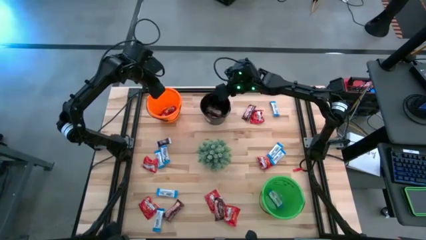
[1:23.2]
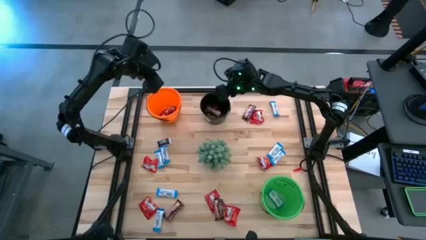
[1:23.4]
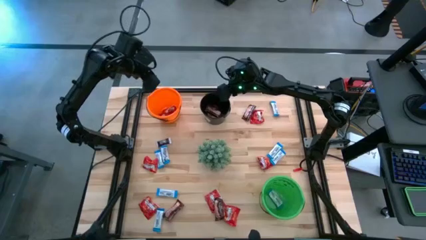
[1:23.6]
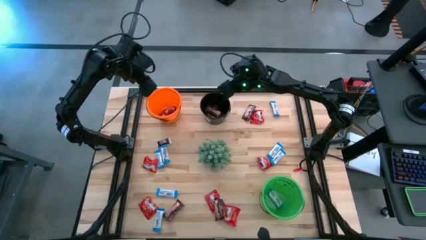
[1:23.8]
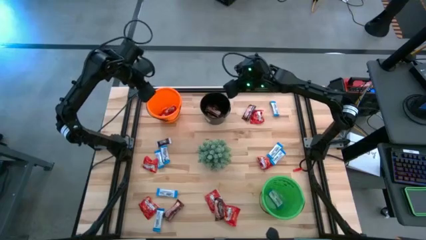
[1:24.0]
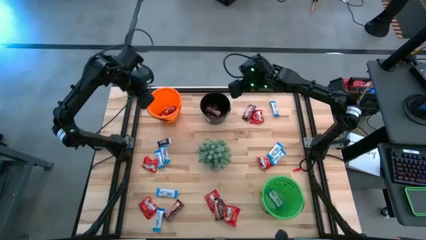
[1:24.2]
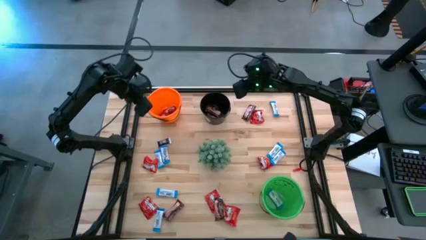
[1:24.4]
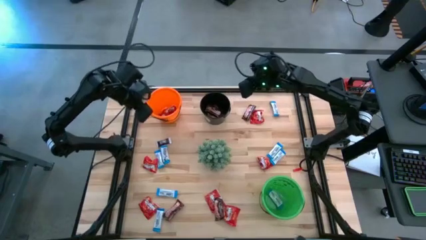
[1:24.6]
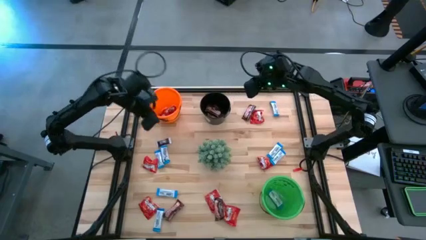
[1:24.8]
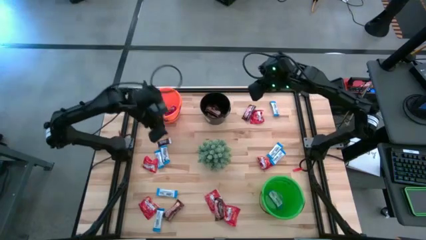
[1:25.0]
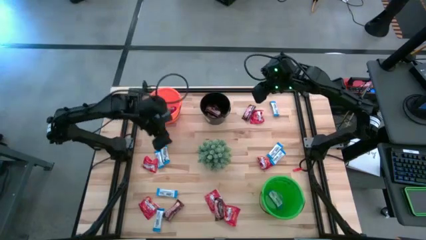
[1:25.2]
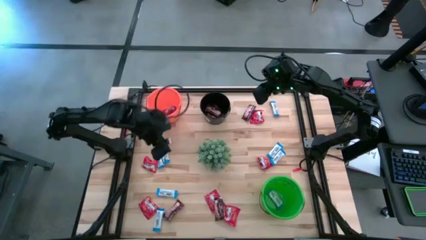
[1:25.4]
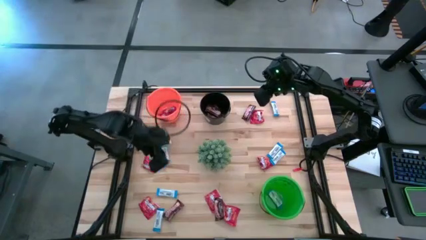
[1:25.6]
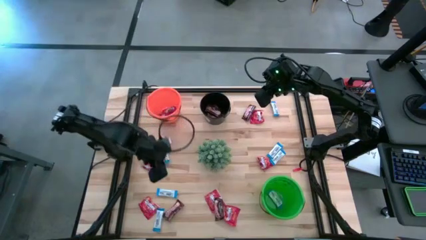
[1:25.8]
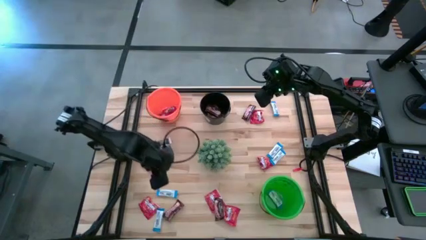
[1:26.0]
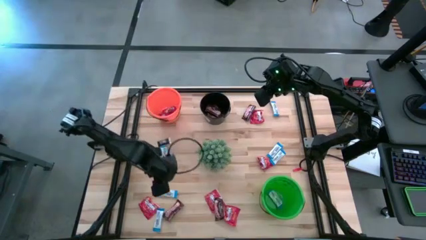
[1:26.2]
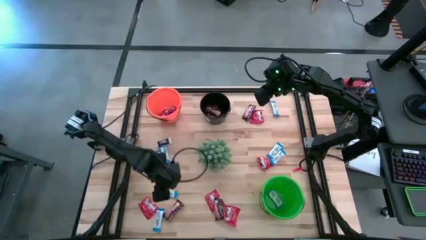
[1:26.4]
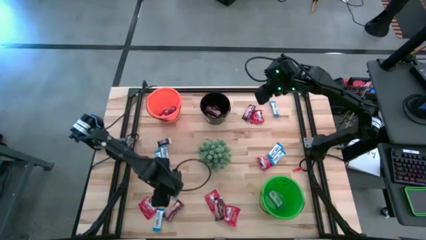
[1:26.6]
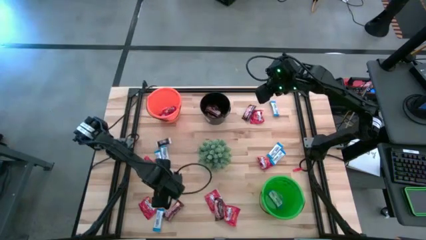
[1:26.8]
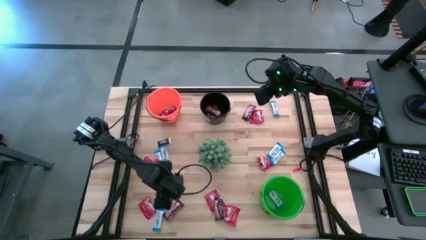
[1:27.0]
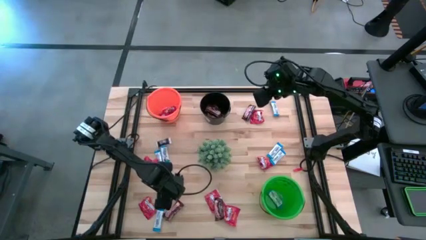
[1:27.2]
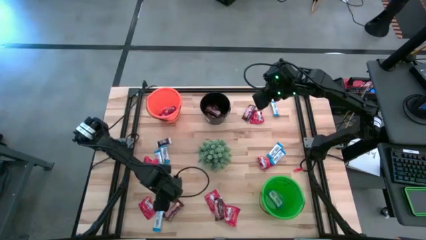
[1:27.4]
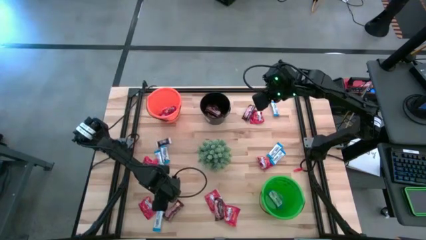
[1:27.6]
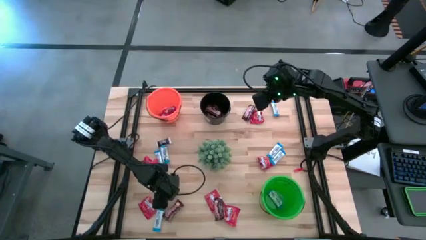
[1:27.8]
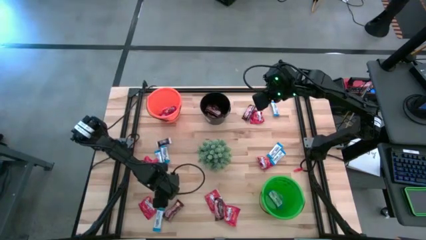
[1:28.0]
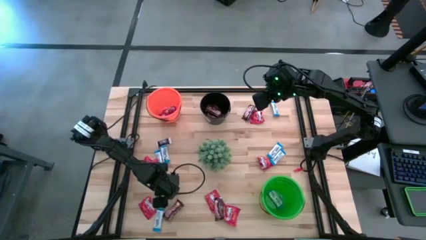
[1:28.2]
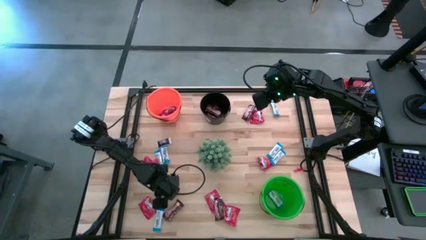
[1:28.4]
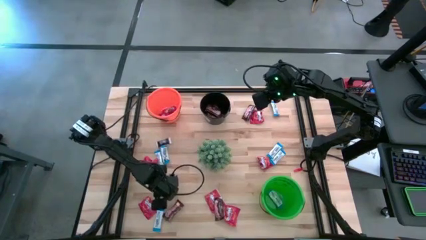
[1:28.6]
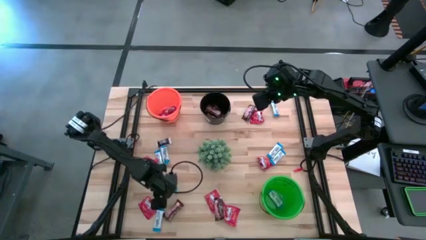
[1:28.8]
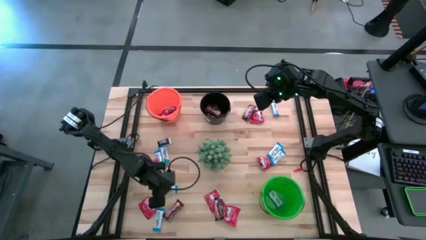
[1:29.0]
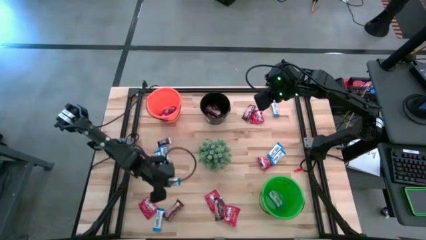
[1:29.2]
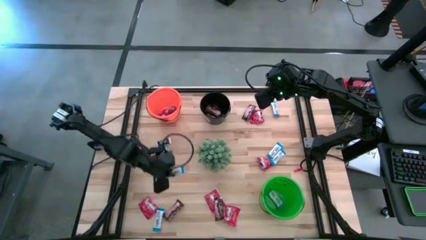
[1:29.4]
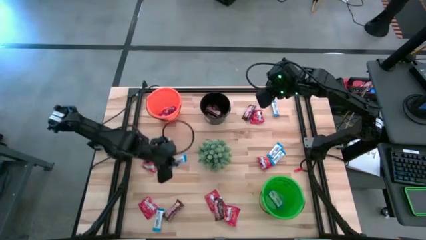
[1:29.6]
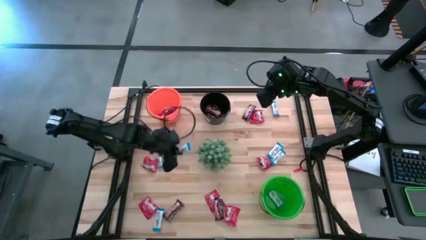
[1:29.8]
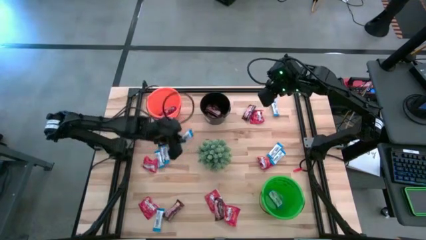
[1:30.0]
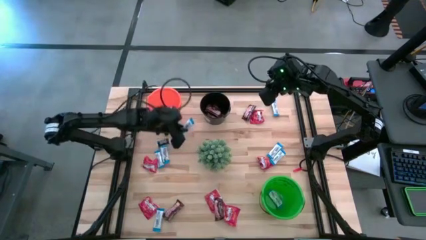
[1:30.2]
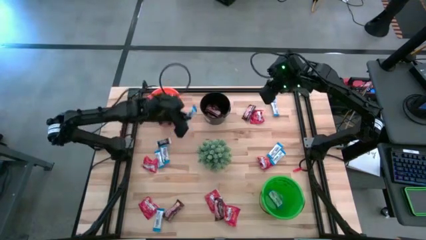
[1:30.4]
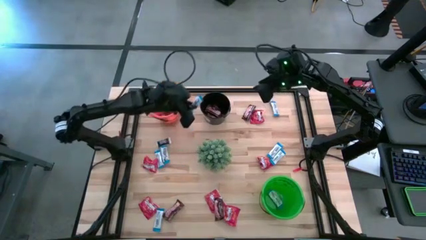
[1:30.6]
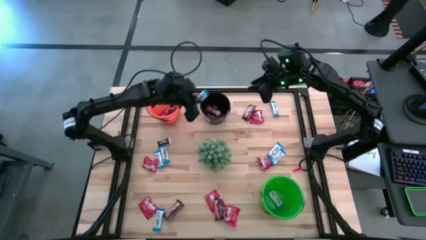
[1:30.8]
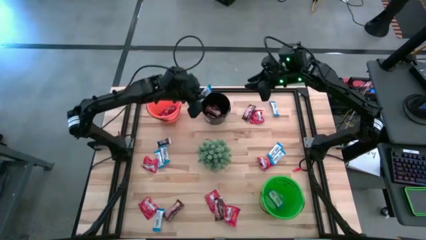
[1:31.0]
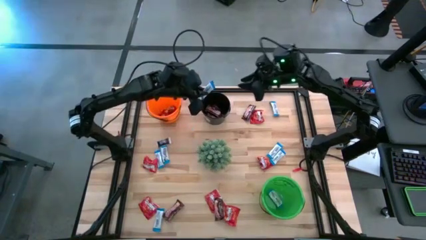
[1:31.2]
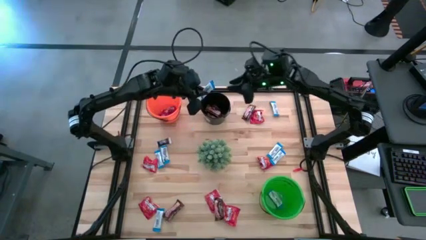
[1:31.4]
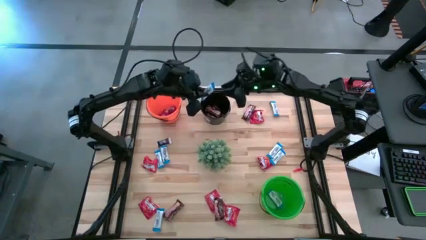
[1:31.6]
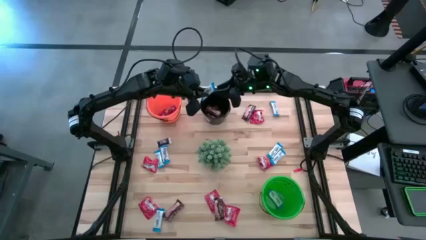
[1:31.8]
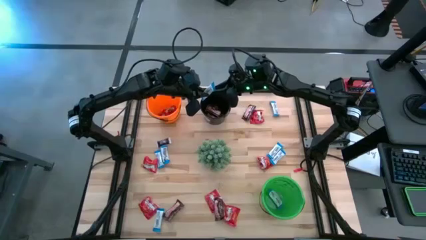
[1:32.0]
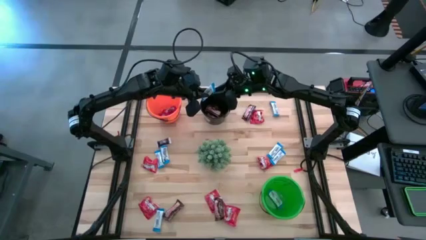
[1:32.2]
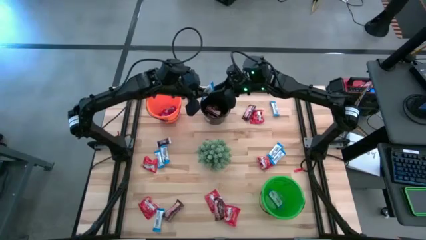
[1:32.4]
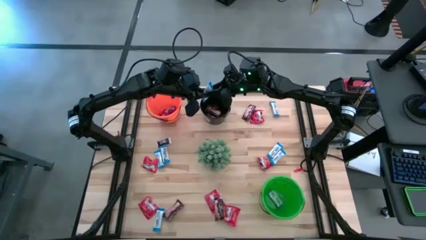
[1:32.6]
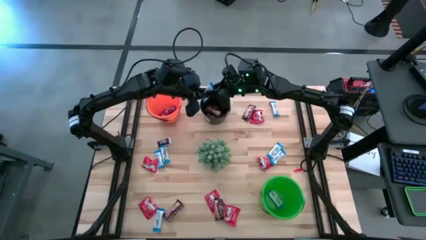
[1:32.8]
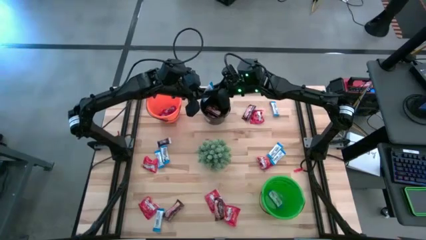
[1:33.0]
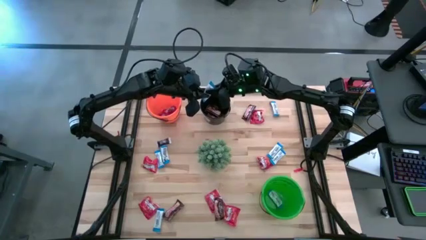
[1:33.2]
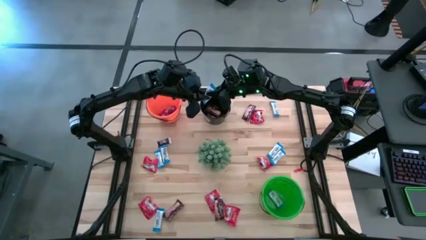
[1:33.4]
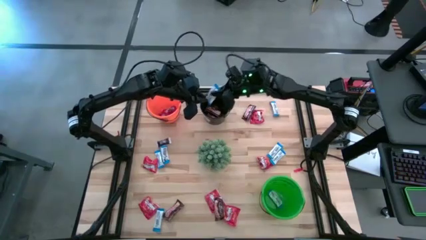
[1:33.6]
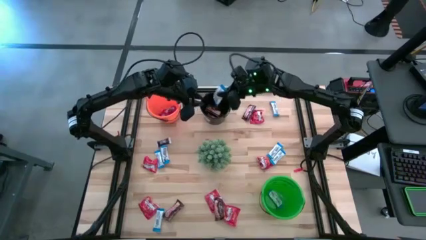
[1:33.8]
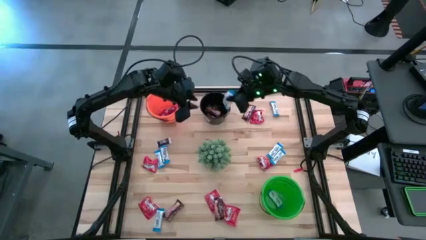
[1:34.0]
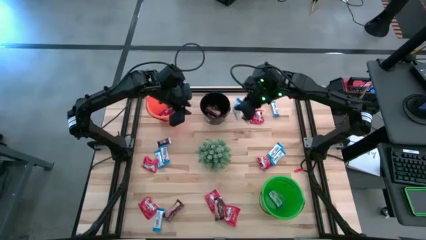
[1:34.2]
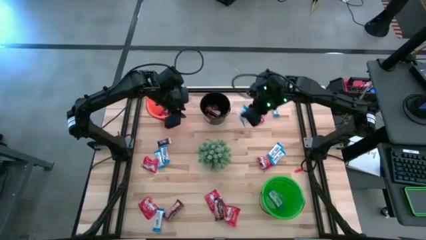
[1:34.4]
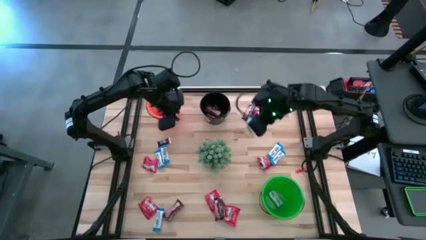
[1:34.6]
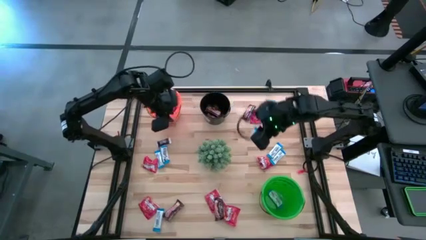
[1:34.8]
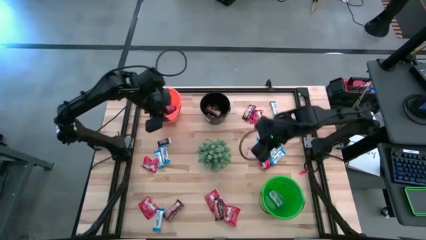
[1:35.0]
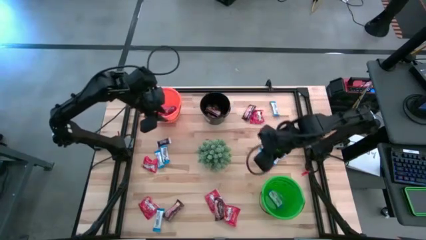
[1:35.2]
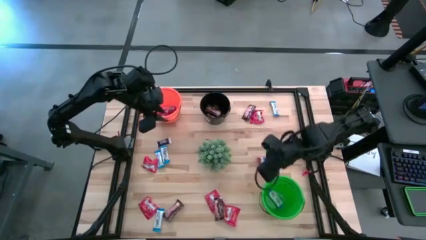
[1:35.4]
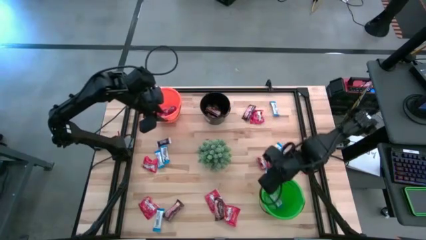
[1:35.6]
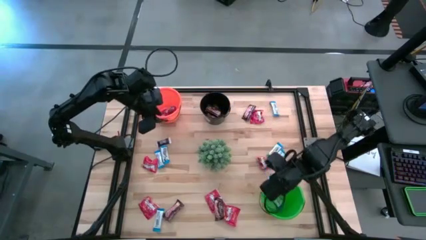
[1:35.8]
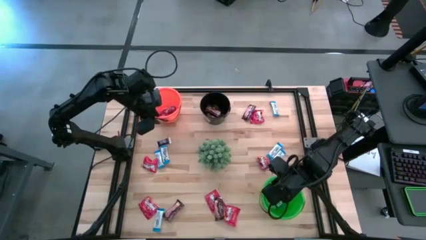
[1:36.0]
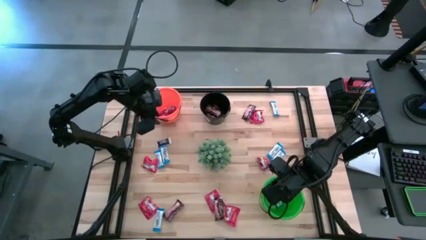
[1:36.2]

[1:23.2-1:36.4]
Task: Sort candy
Put the blue chocolate into the green bucket
